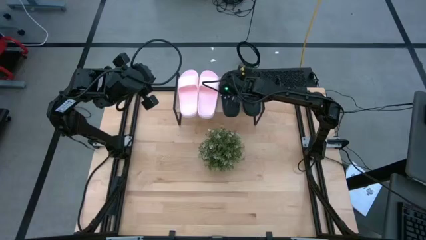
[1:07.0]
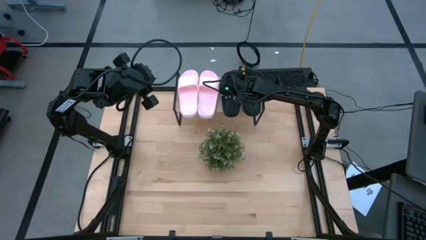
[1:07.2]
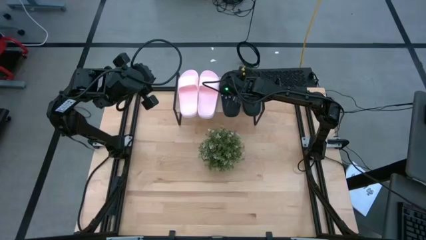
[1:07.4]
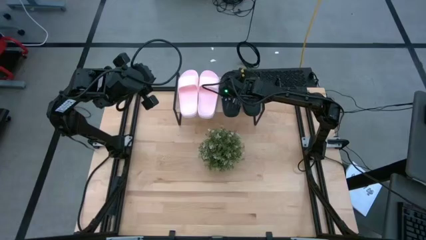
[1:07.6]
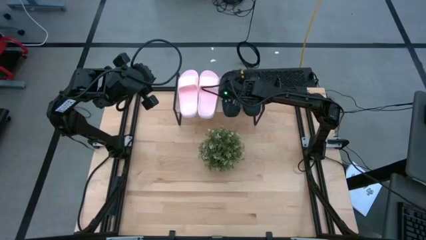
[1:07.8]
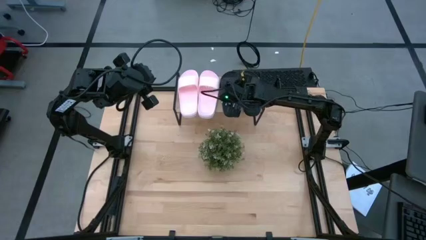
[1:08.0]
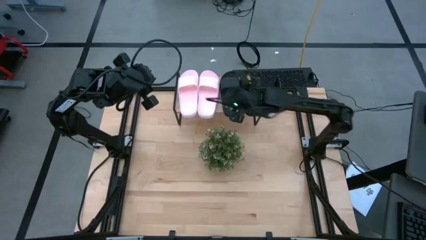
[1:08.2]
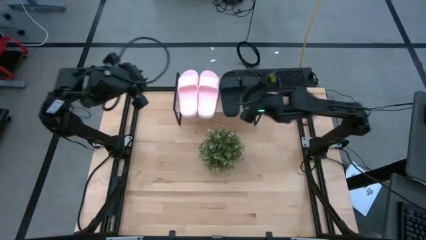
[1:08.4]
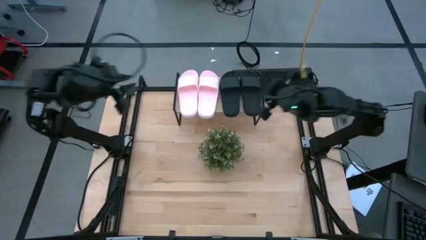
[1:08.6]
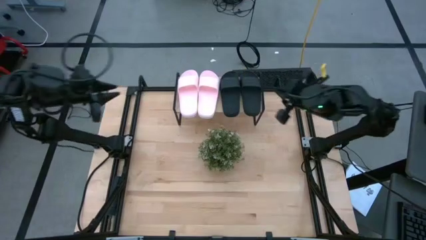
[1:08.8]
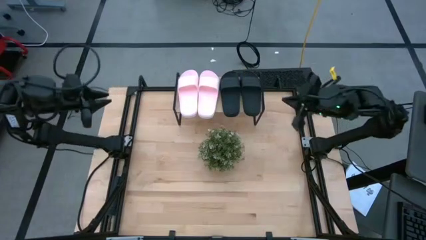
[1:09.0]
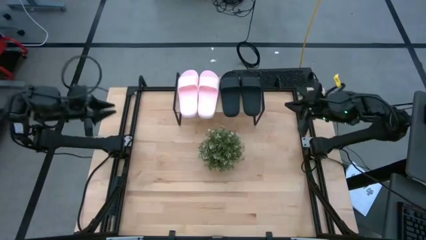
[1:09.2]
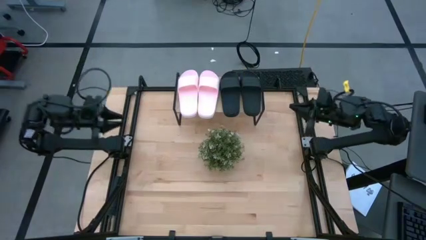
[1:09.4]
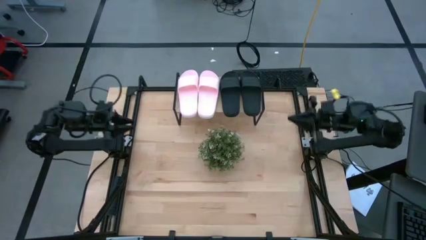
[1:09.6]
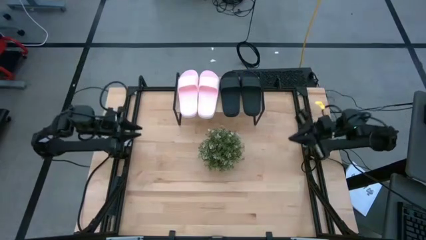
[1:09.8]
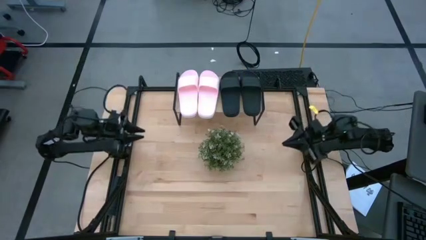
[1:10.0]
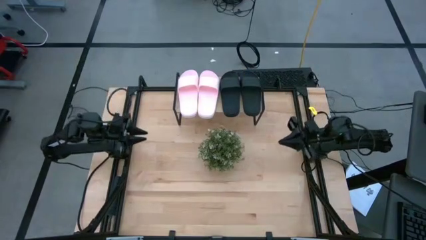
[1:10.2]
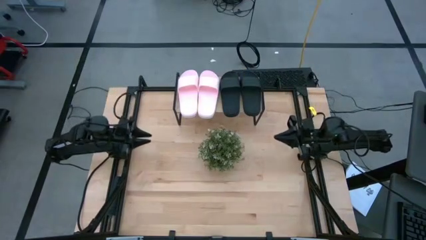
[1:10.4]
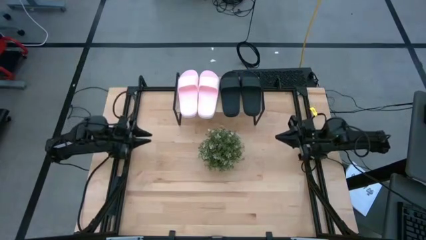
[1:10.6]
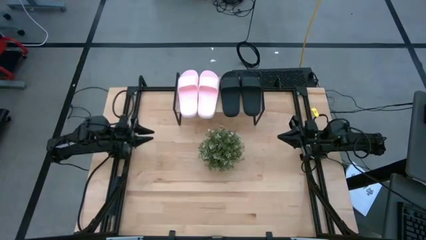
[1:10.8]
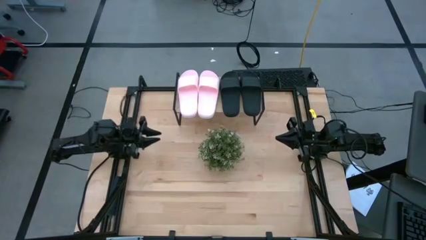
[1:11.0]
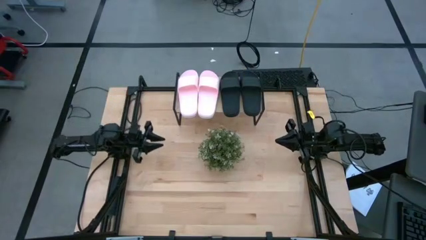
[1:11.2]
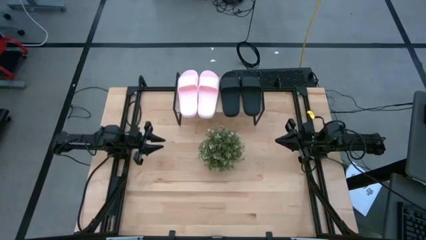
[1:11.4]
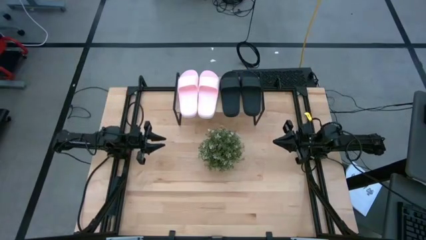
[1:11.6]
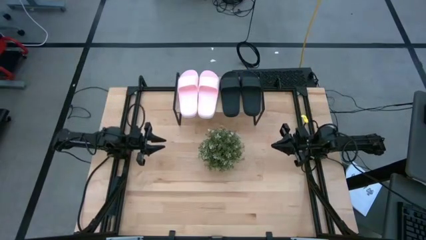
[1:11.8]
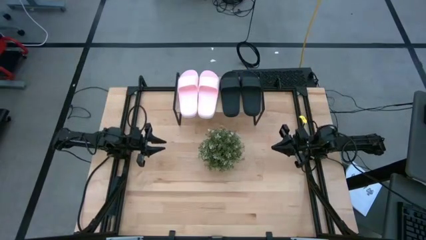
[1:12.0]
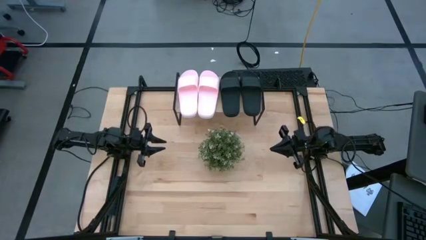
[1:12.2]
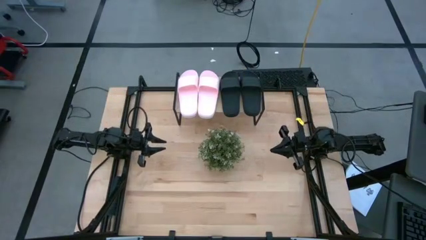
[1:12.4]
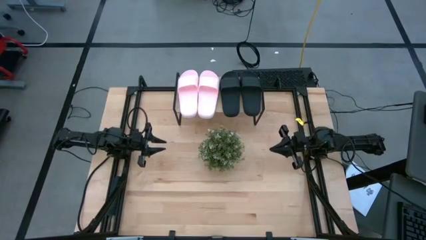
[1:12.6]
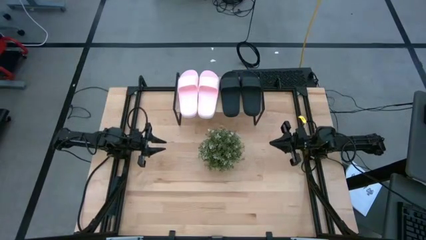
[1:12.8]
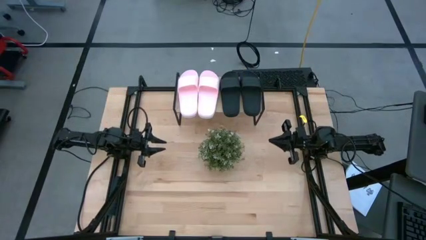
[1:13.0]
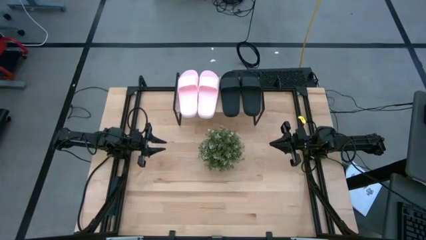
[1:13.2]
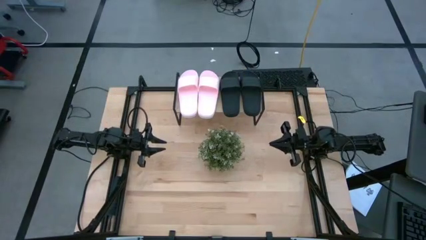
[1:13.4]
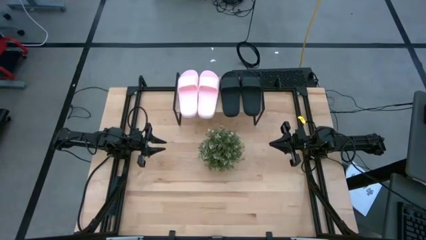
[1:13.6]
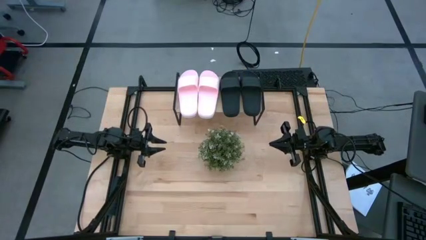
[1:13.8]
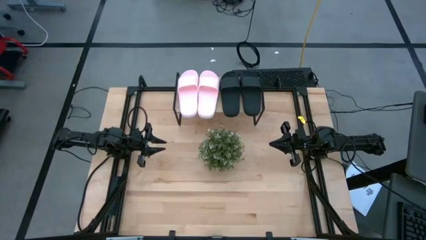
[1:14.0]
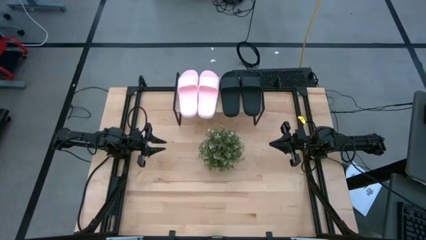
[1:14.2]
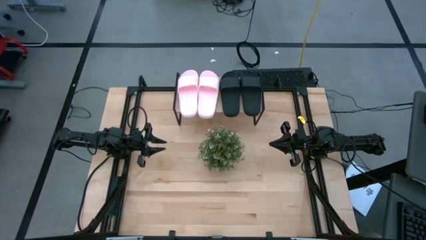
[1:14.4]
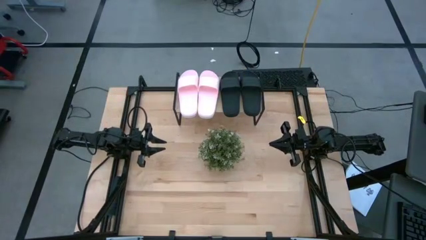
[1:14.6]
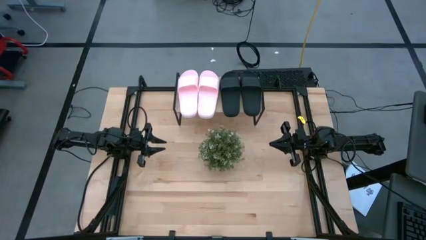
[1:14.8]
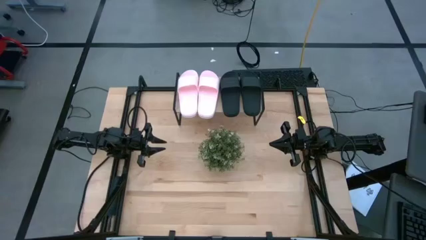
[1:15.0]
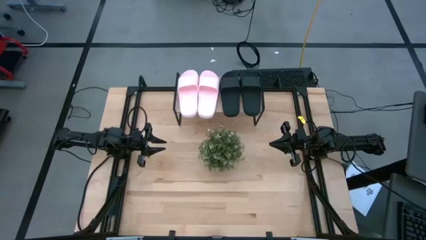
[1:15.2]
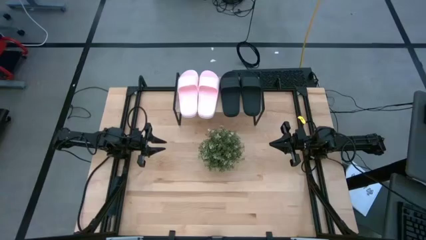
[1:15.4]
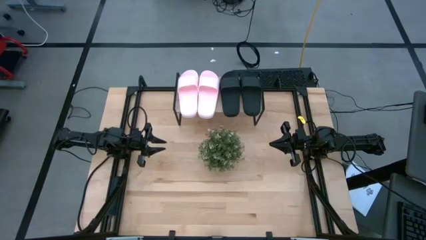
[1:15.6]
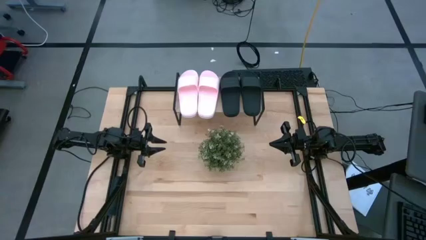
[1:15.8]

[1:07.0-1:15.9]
Task: Pick and place slides into the shelf
Return to Home Position

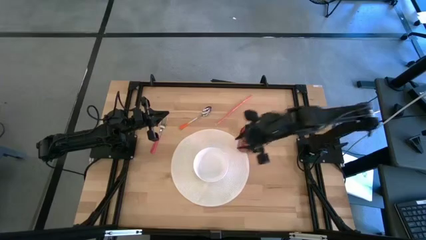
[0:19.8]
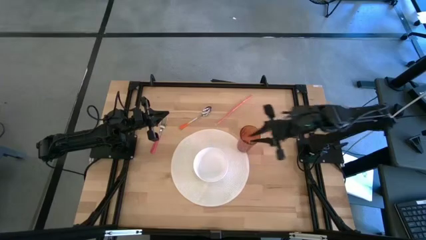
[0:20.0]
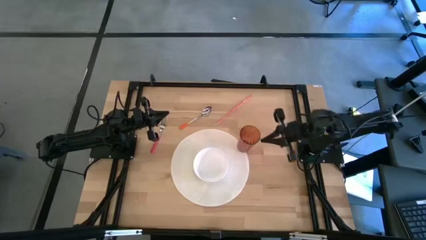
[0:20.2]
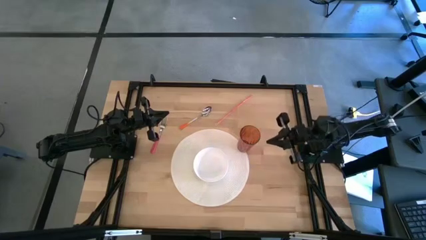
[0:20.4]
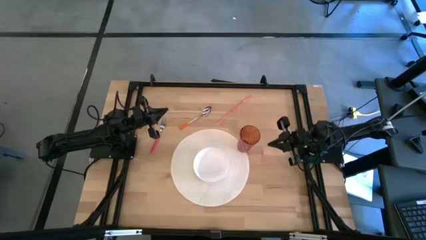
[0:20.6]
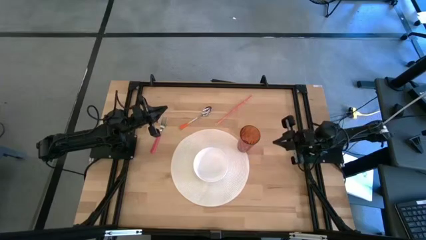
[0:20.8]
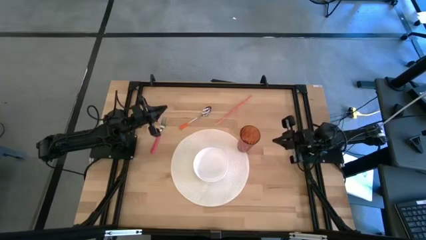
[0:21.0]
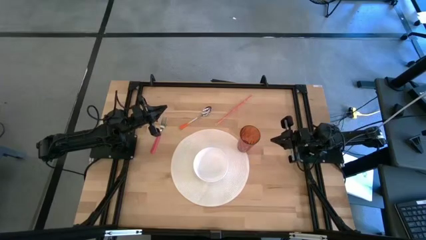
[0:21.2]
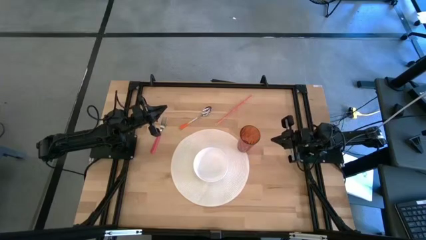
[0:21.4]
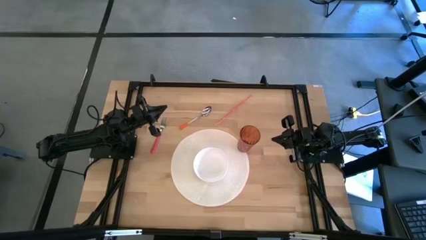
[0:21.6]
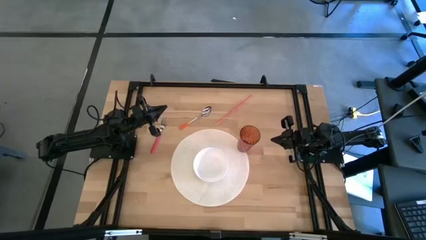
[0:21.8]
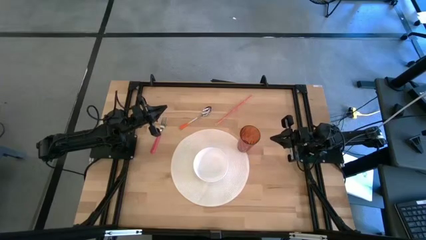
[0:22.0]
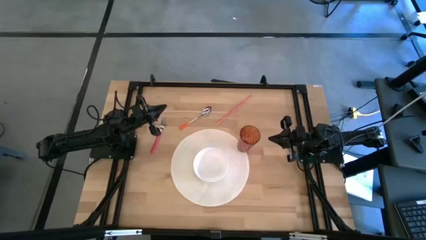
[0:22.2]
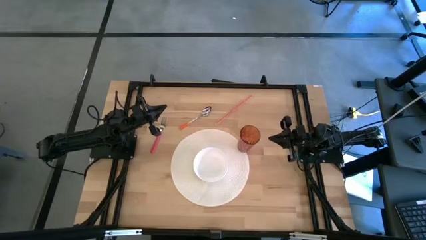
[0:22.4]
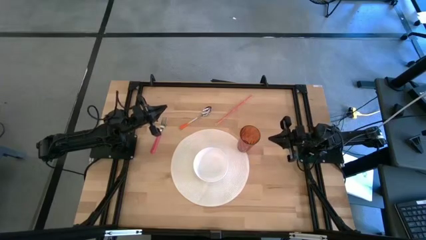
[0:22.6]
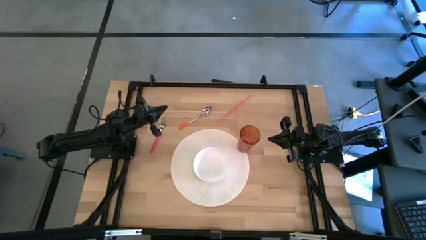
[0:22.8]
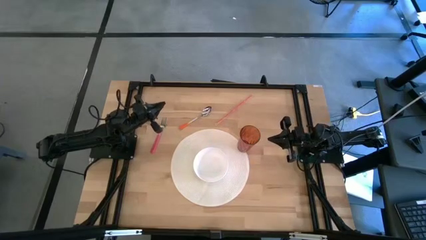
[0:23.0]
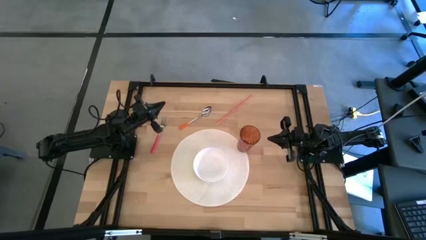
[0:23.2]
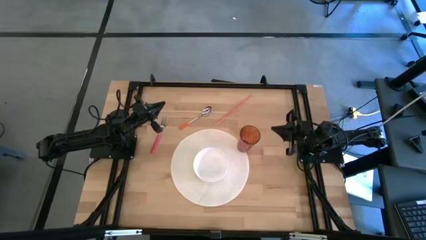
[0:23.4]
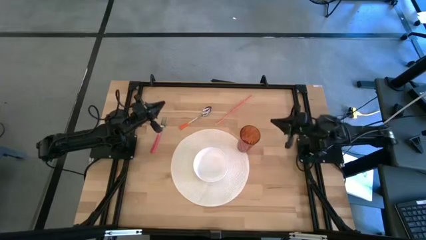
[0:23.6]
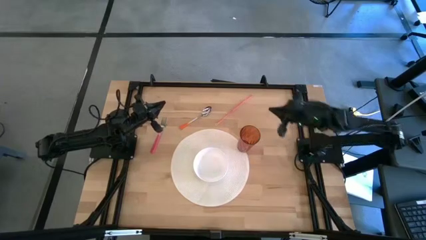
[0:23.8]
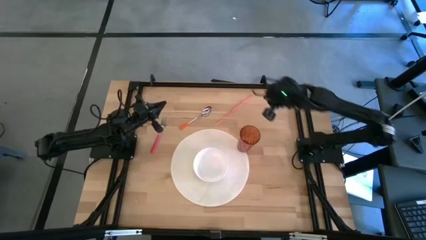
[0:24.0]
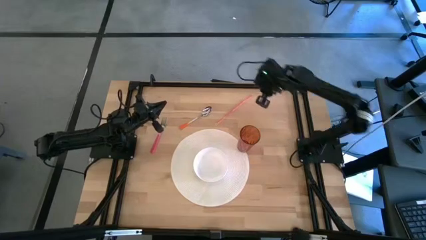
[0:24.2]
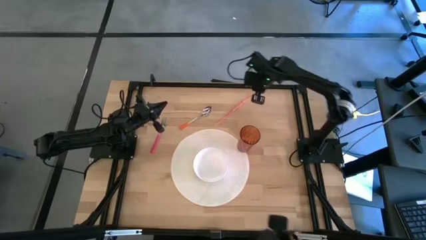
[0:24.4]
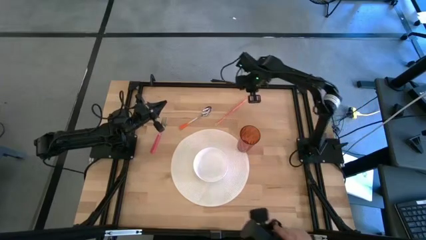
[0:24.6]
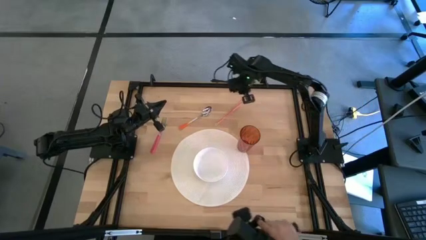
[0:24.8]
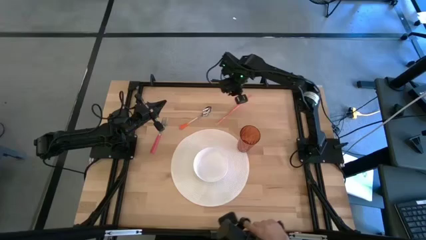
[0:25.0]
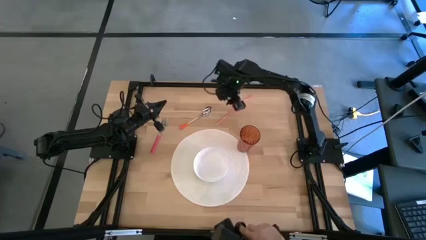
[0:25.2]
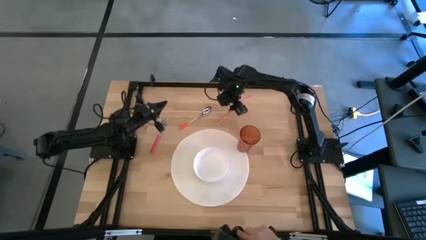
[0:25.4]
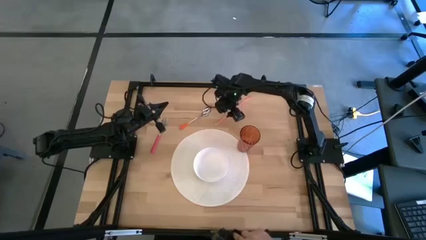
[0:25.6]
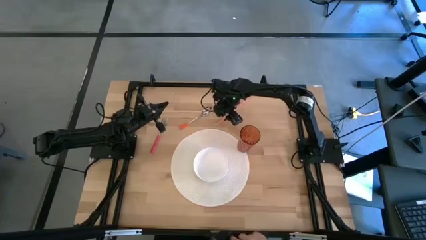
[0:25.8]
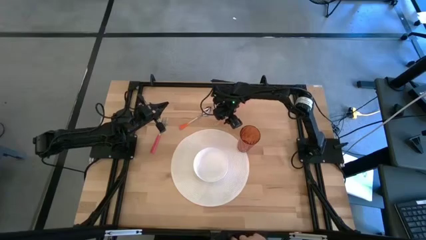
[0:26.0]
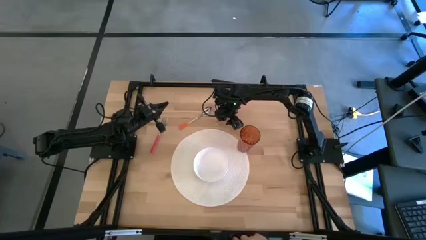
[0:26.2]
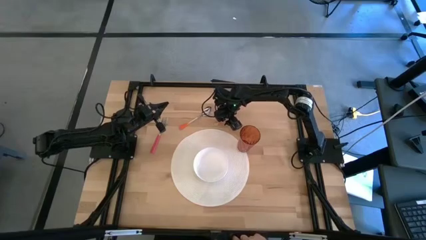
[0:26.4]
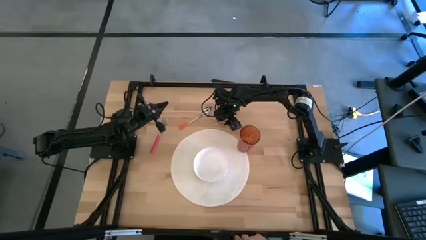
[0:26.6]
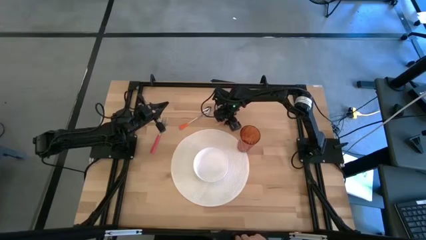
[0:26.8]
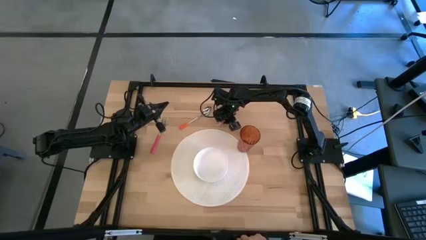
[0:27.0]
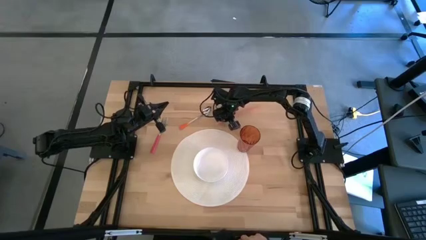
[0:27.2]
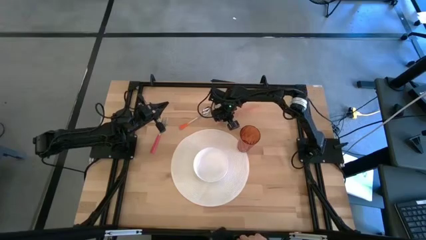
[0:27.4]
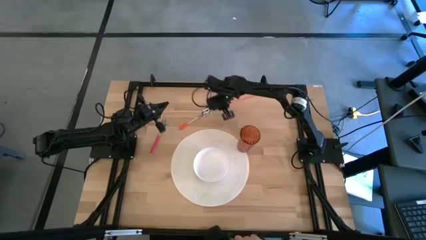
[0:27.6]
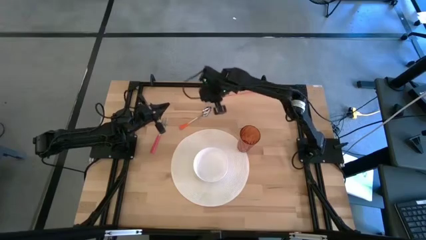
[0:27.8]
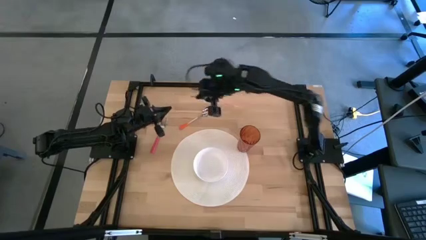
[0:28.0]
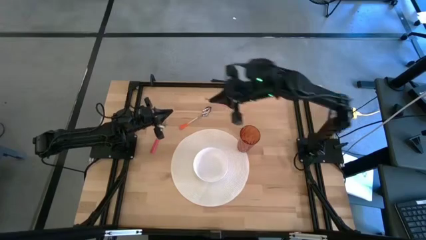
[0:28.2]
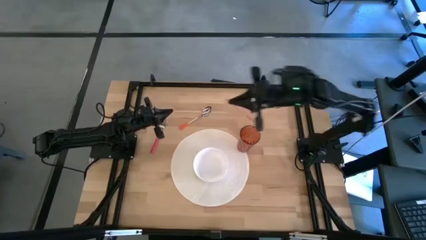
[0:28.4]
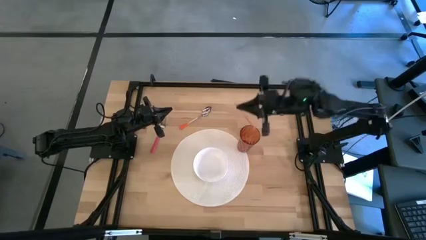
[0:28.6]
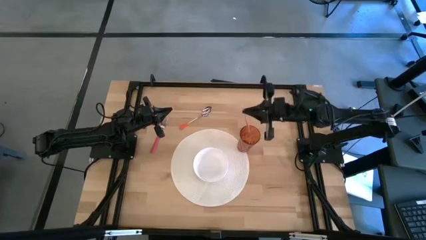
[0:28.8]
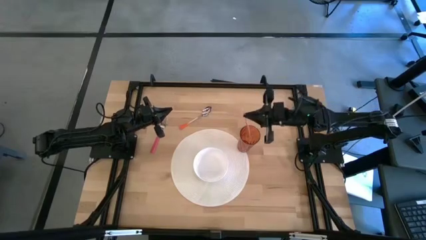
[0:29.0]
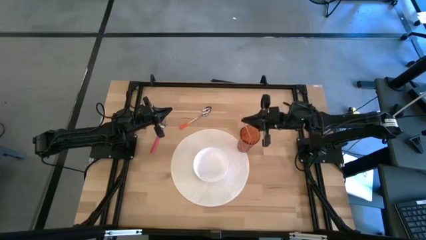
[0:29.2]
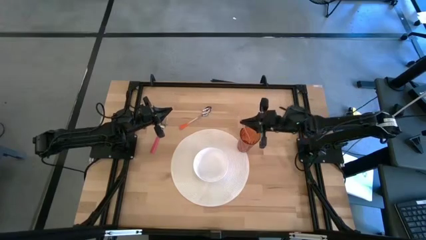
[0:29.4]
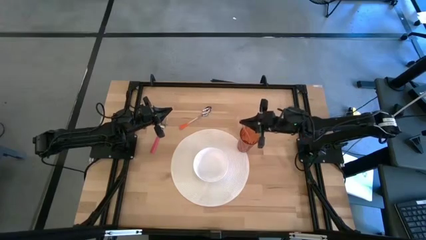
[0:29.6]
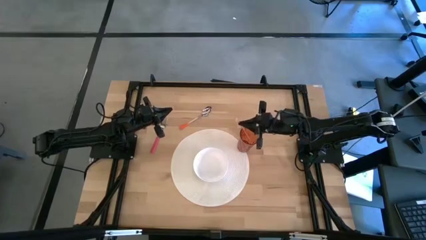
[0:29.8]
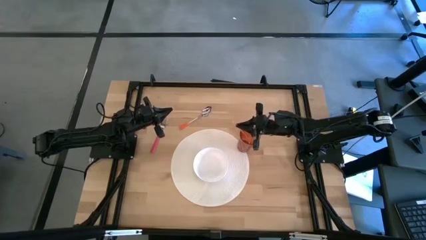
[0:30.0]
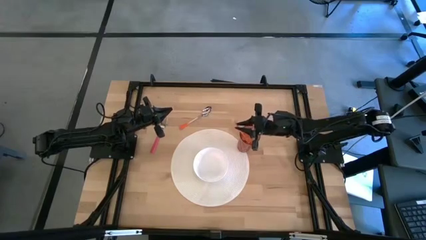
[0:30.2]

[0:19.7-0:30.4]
Task: Pick & Place Utensil
Put the pink straw into the brown cup on the mat
